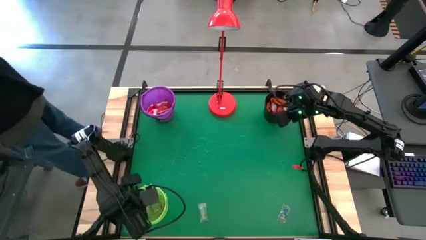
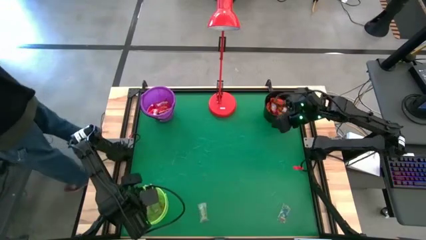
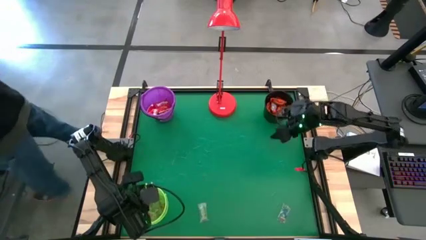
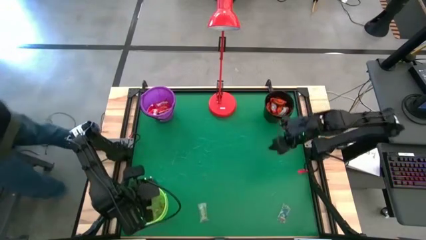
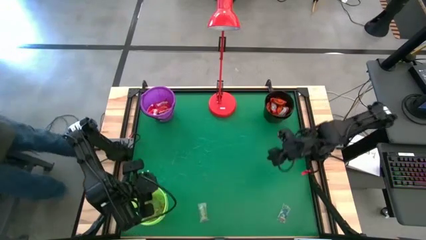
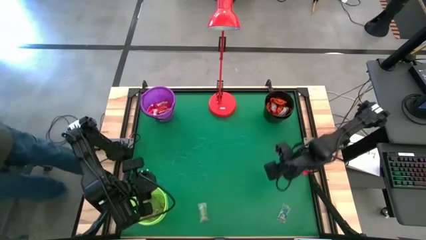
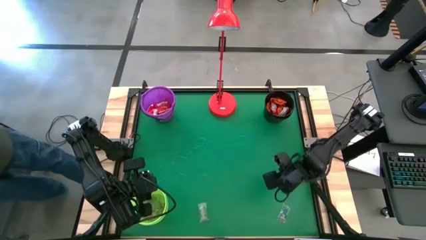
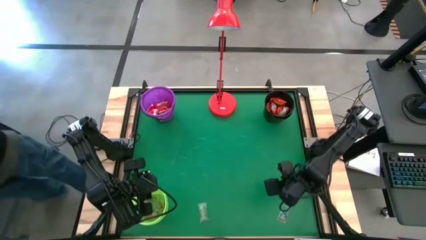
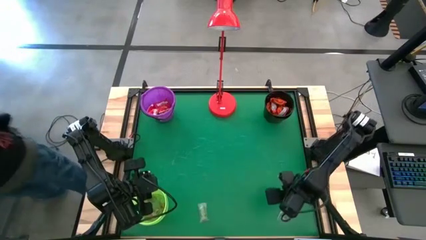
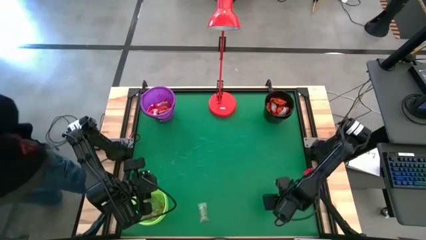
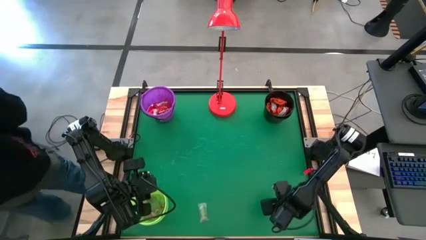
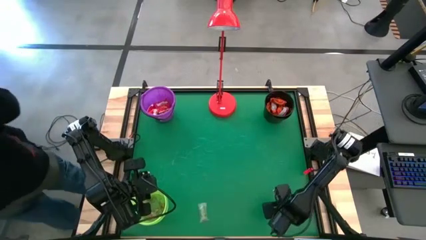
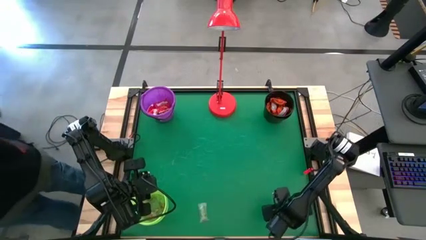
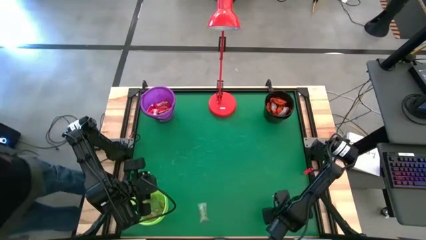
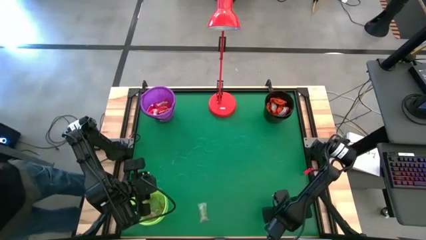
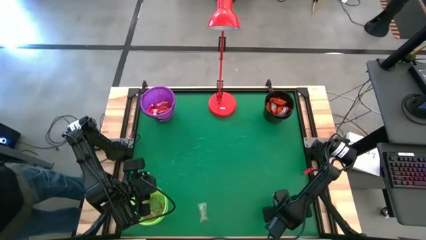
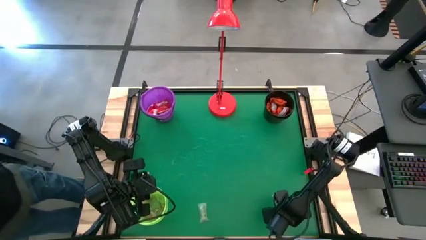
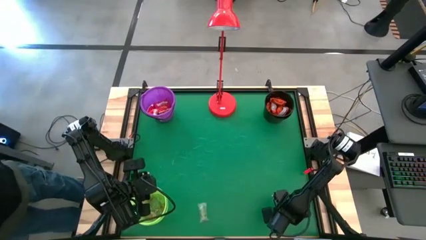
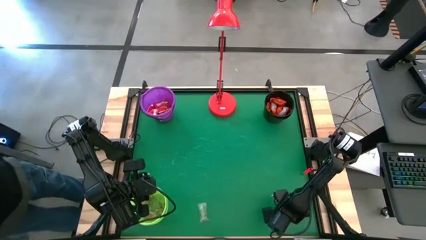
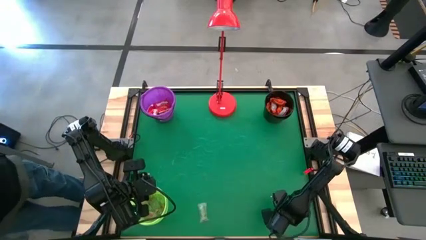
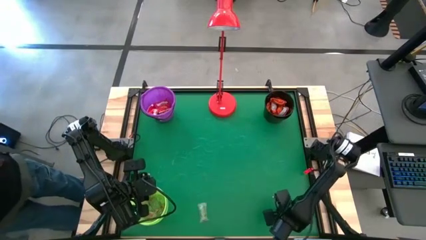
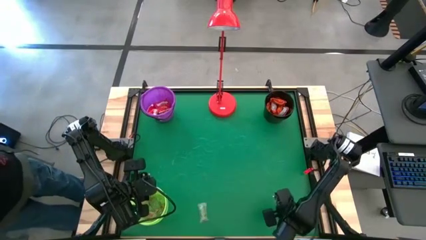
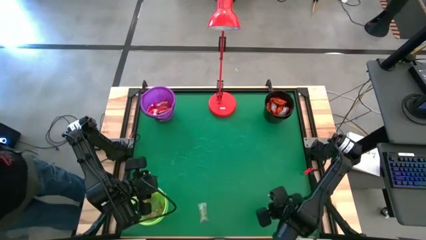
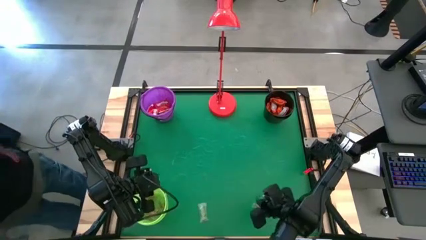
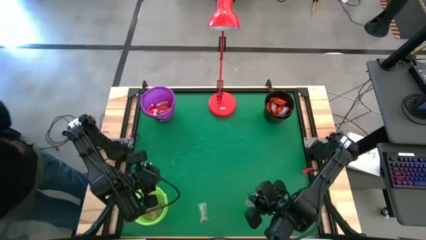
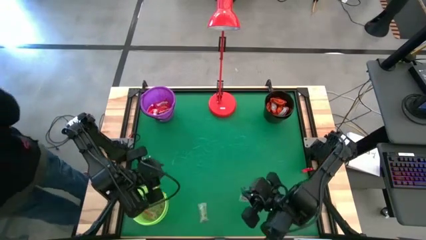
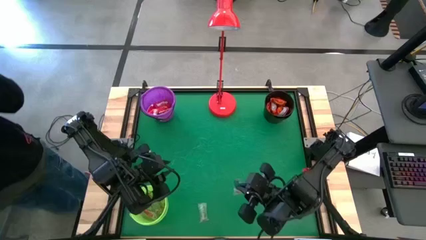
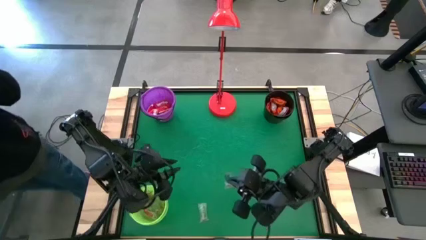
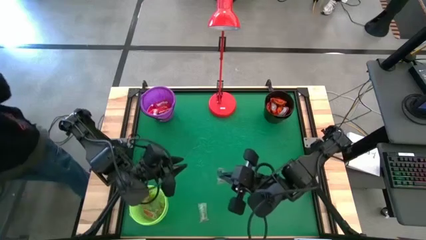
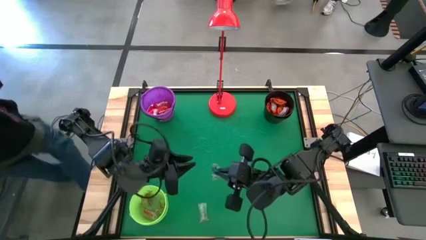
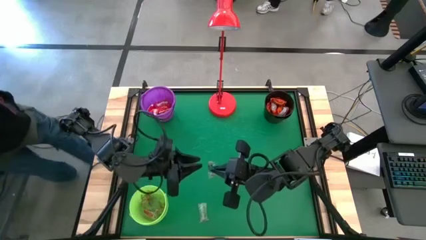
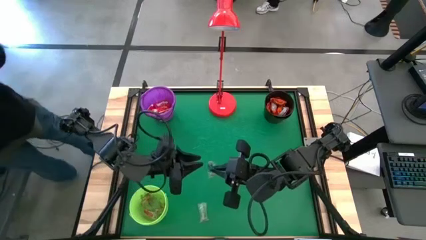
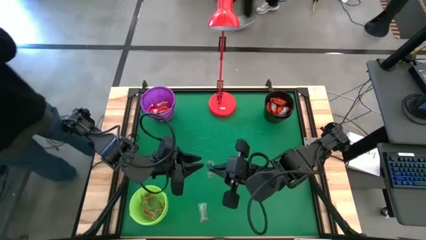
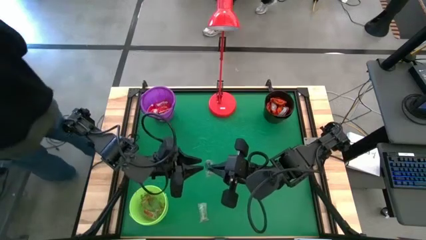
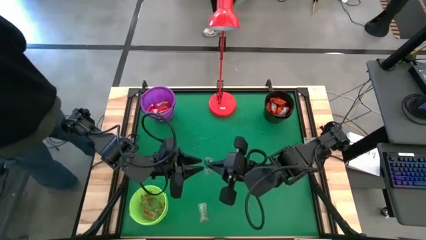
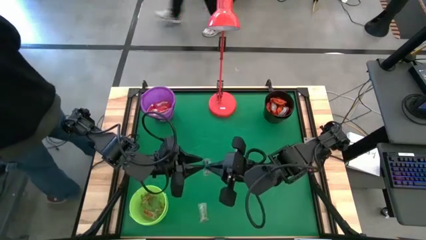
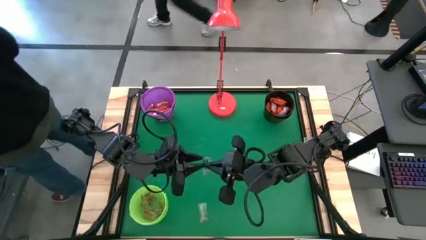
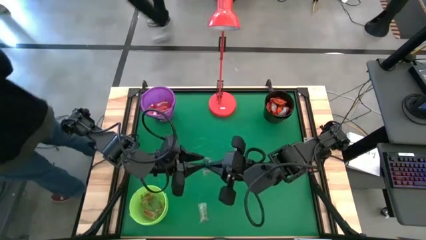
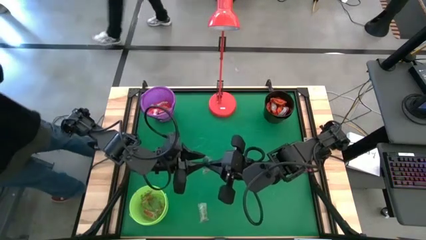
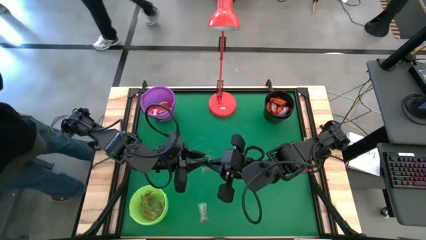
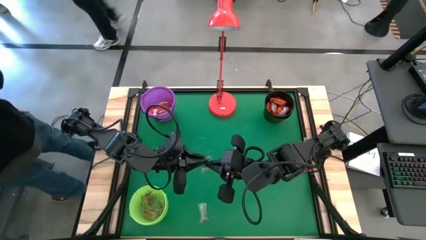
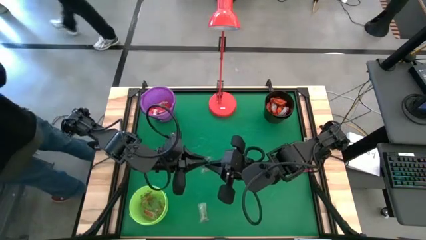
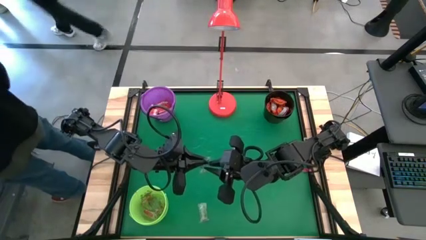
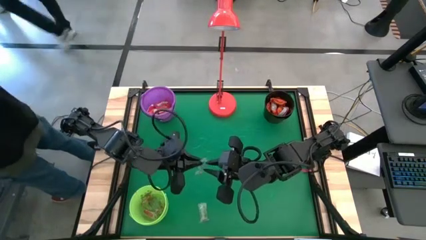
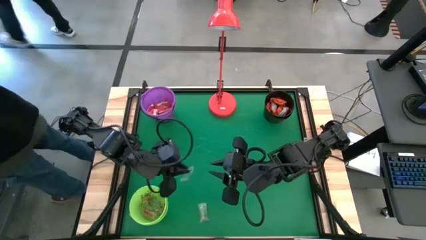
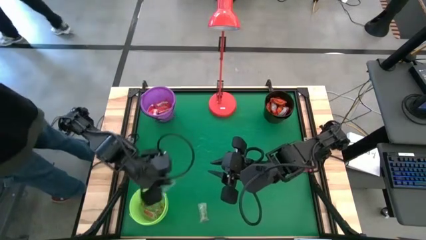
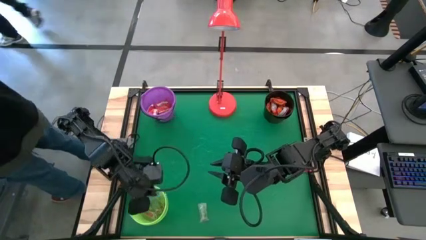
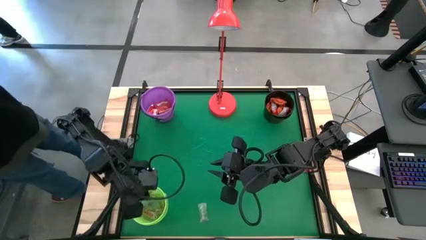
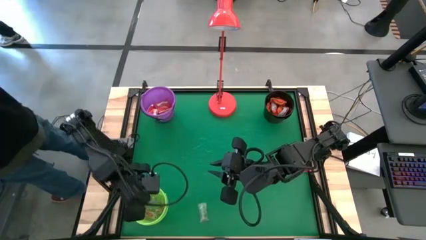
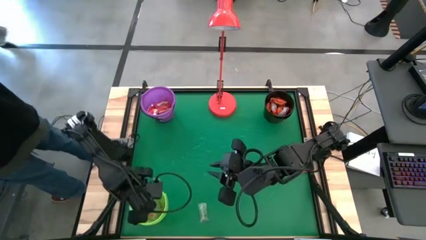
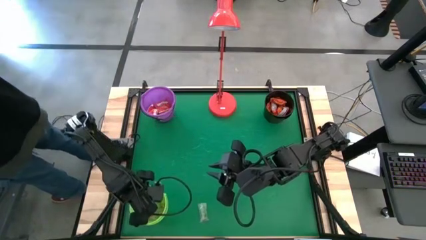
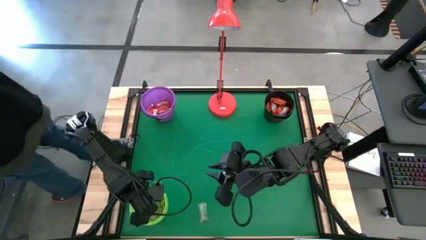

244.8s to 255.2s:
Task: Sort candy
Put the blue gummy into the light green bucket

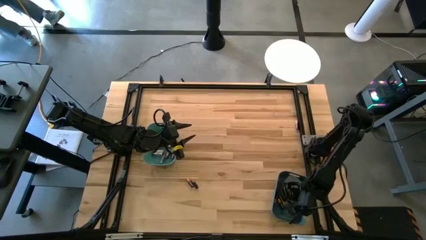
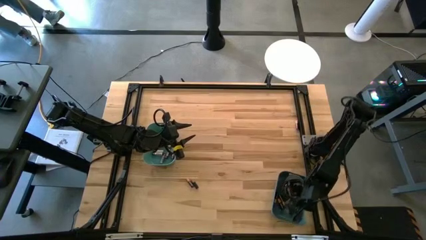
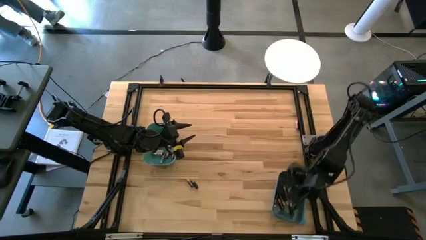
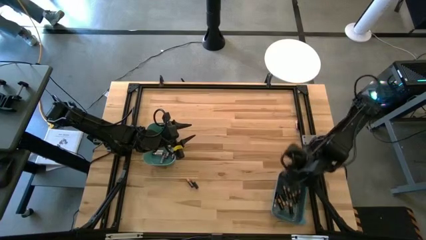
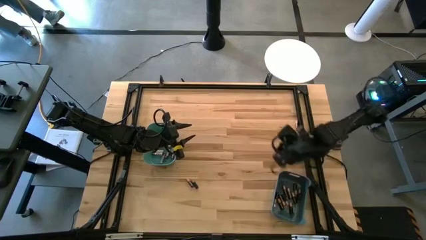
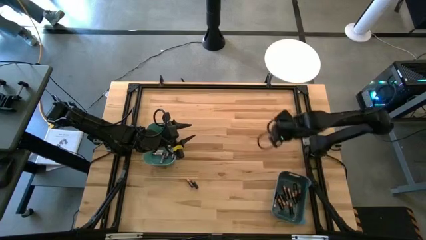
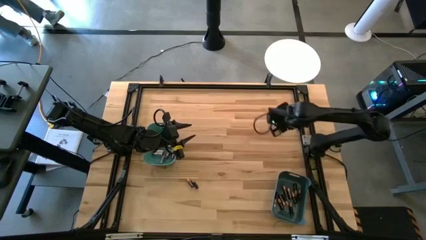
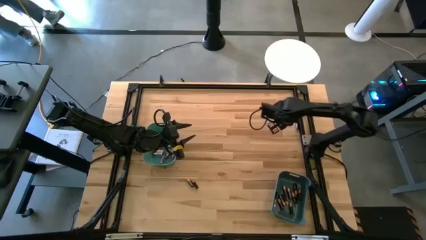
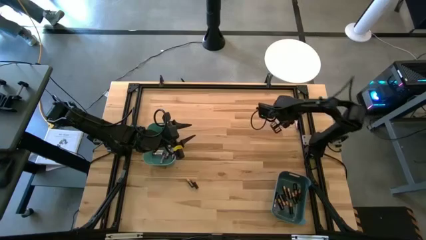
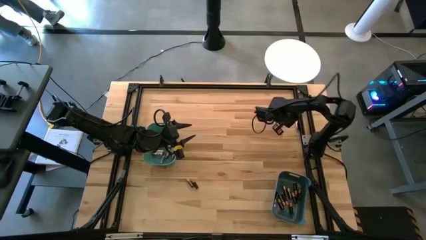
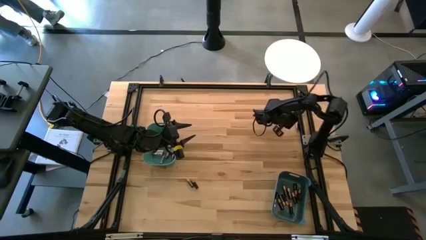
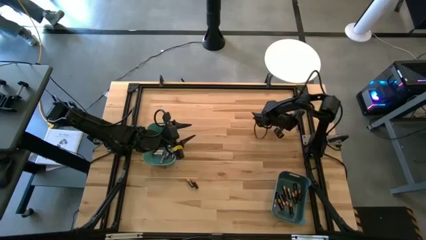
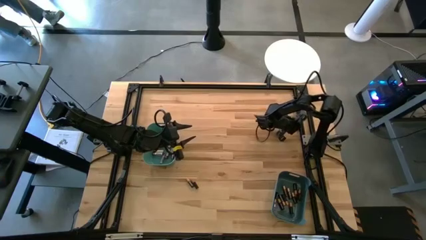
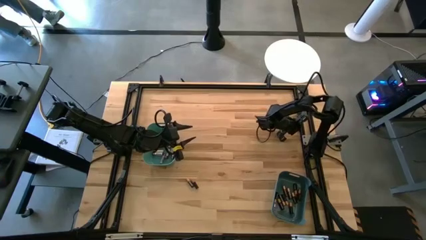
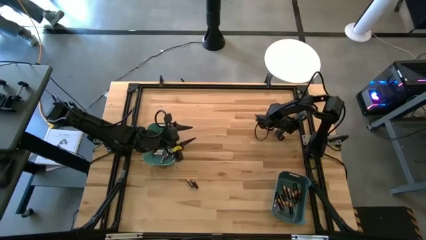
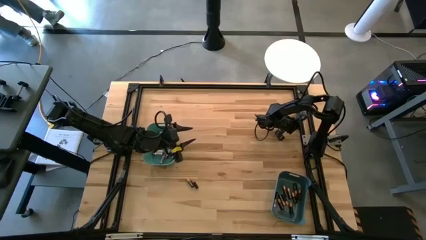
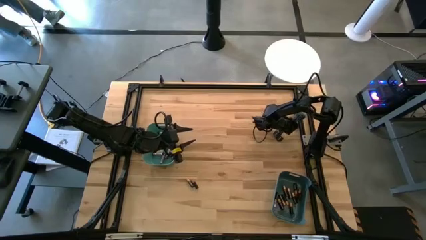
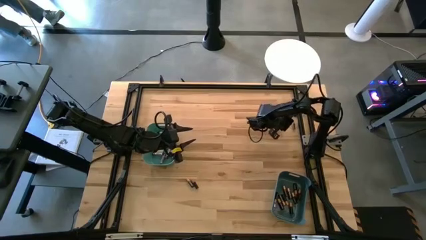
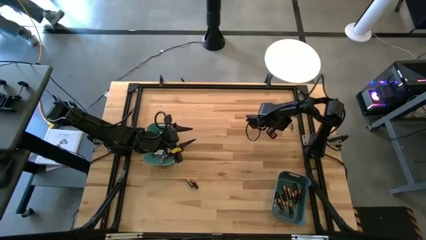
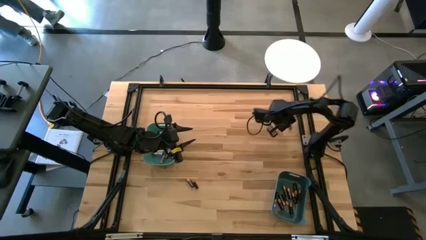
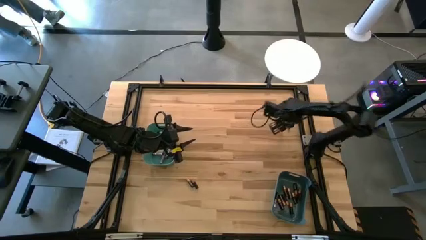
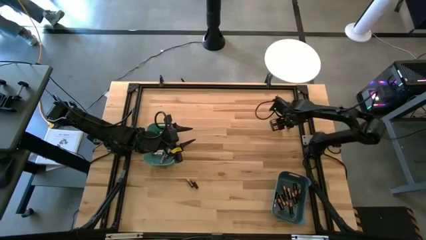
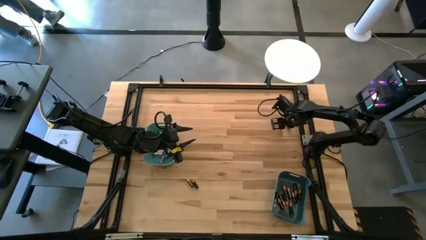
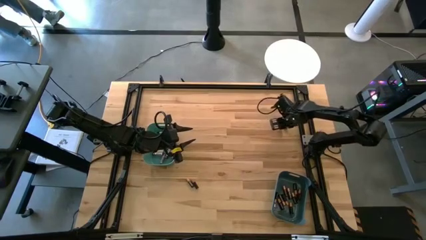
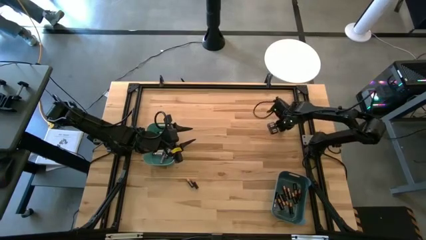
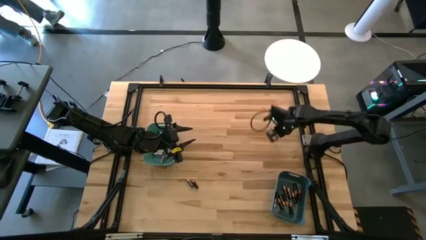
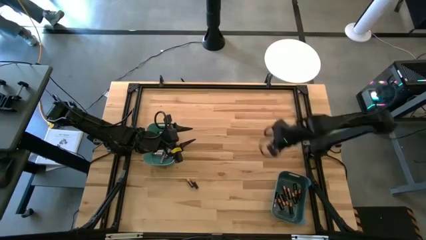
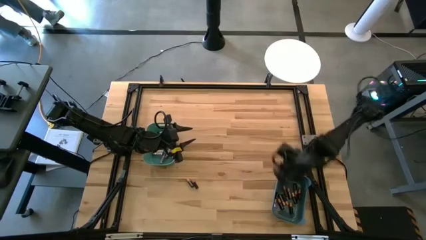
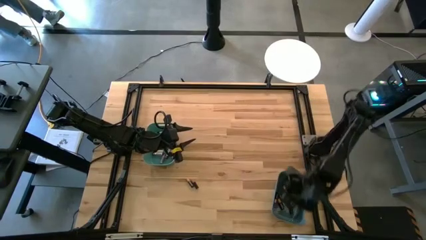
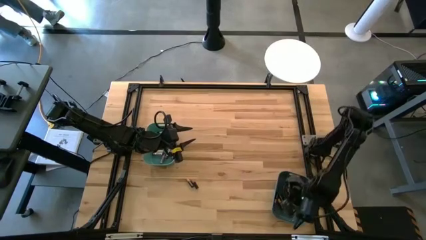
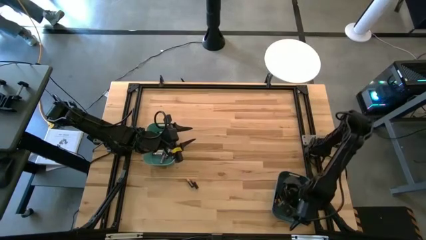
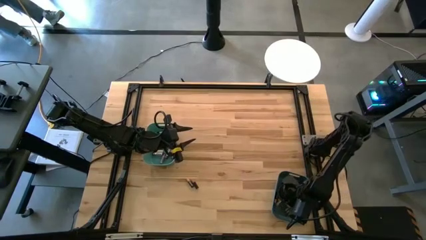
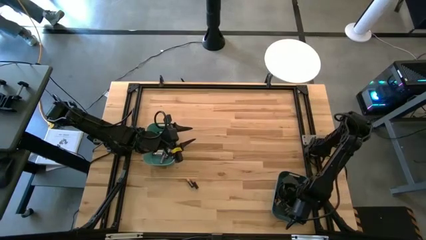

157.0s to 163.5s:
Task: Sort batteries
Put the black battery into the blue bin
